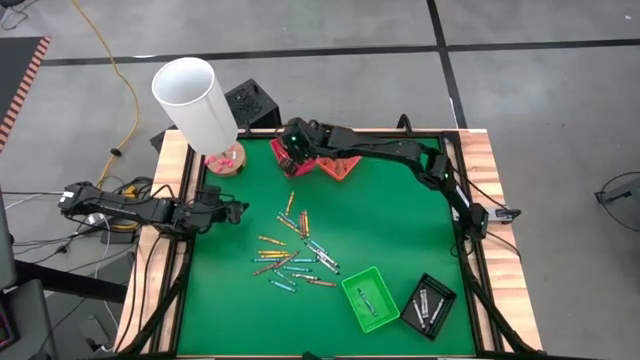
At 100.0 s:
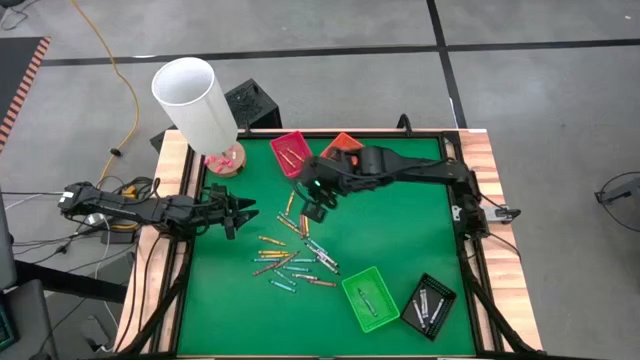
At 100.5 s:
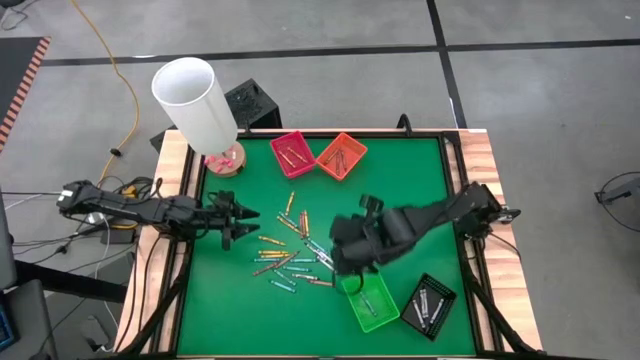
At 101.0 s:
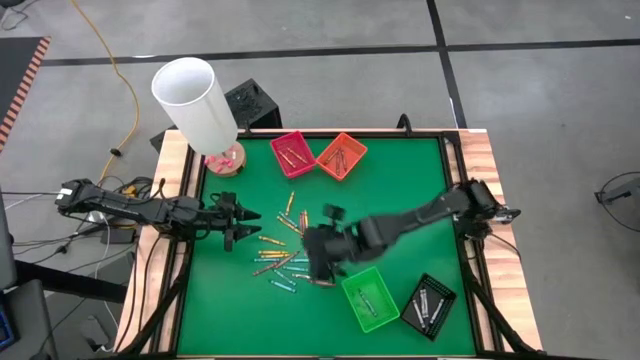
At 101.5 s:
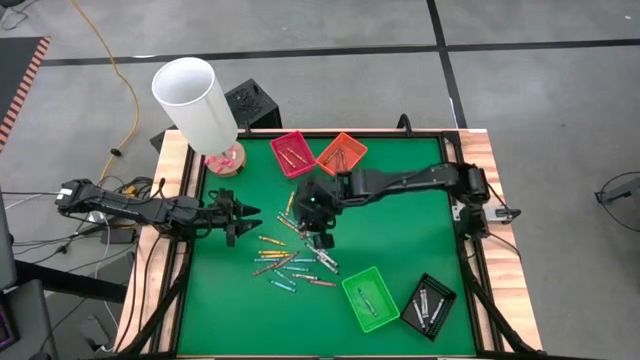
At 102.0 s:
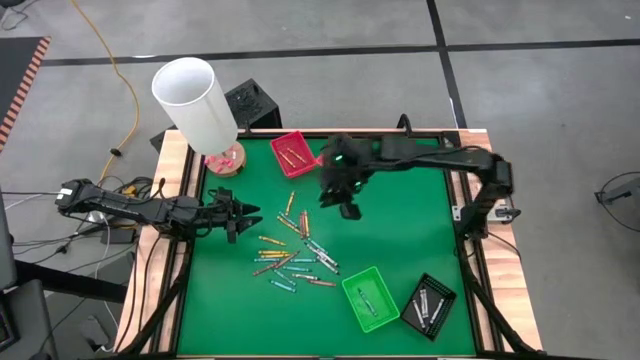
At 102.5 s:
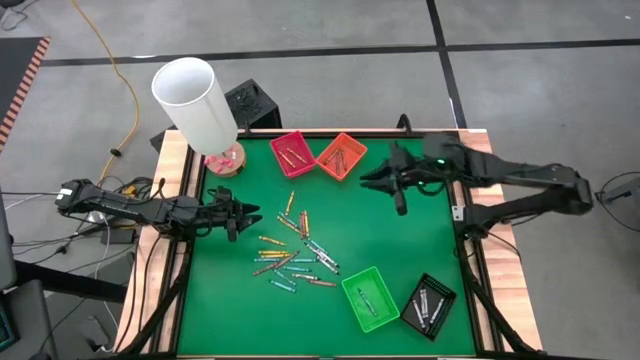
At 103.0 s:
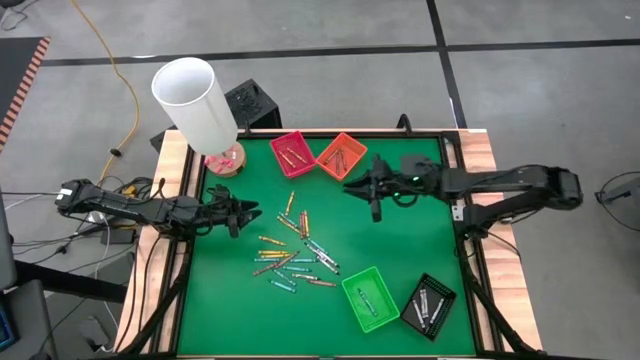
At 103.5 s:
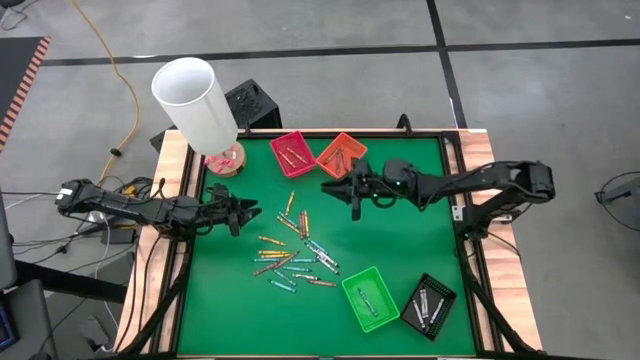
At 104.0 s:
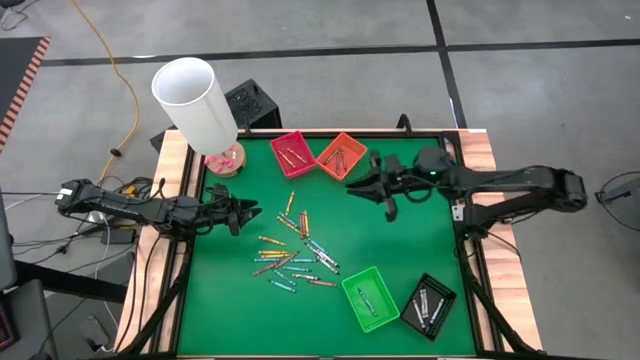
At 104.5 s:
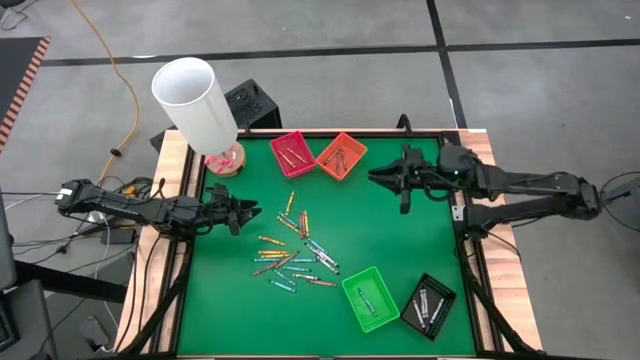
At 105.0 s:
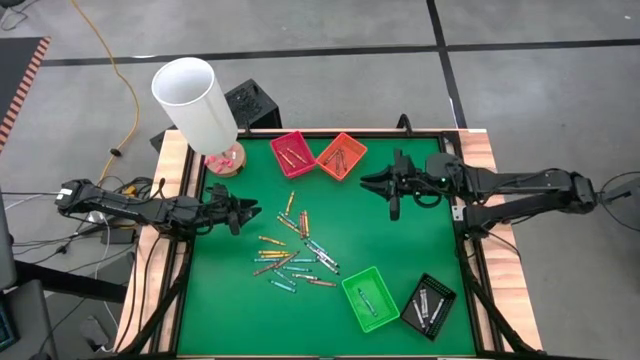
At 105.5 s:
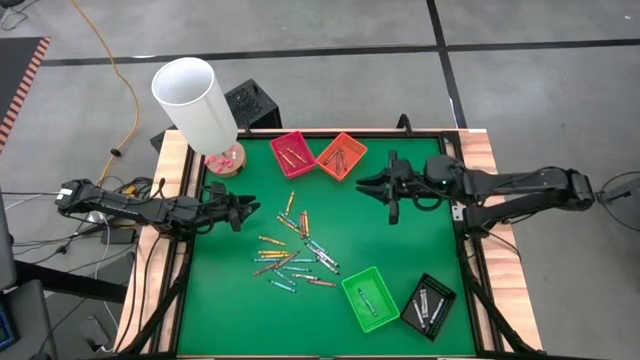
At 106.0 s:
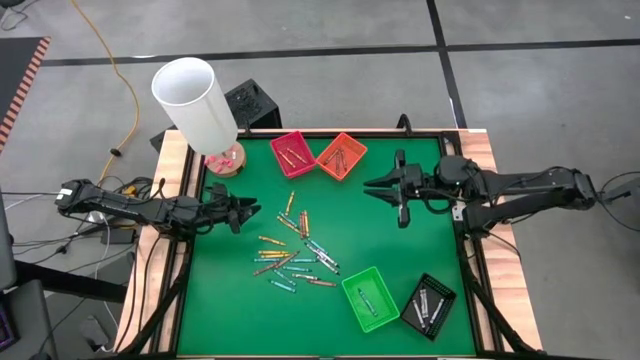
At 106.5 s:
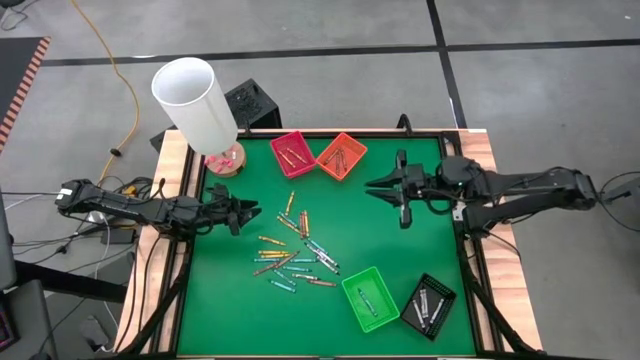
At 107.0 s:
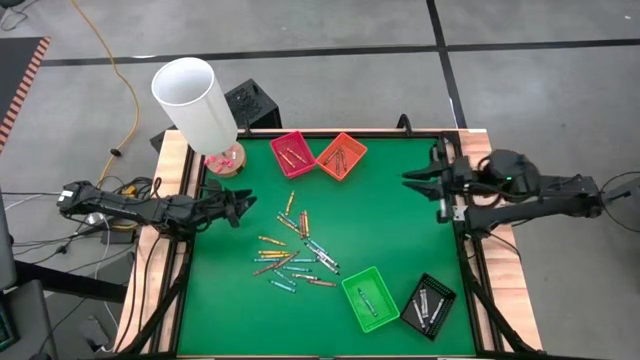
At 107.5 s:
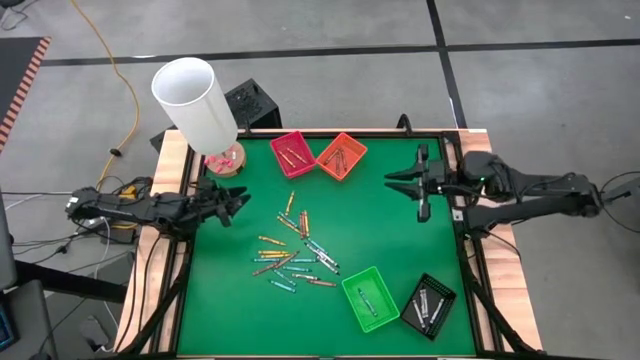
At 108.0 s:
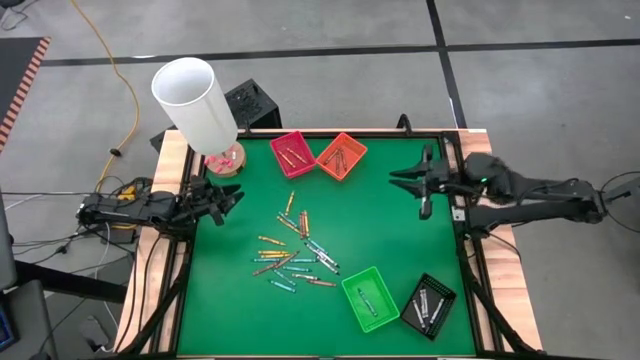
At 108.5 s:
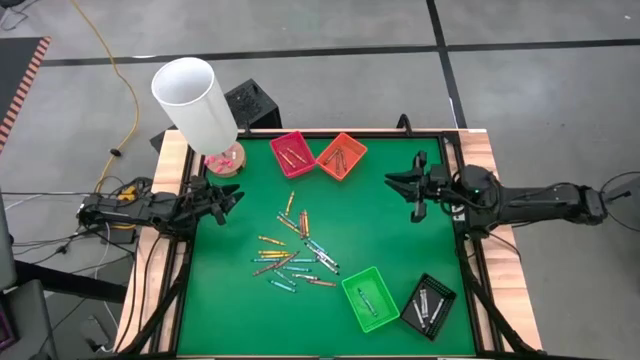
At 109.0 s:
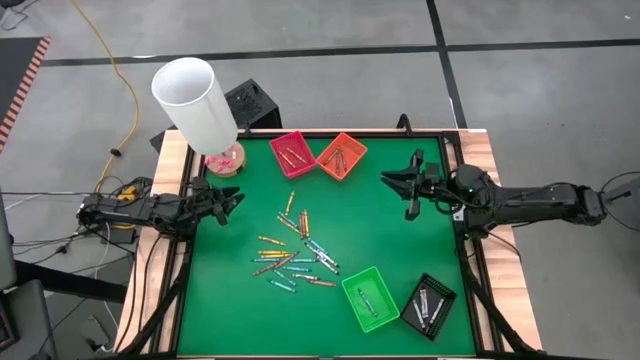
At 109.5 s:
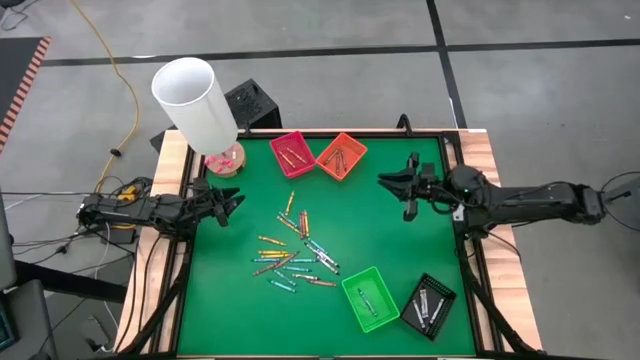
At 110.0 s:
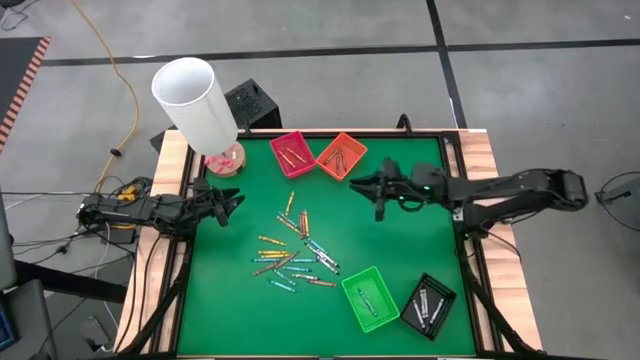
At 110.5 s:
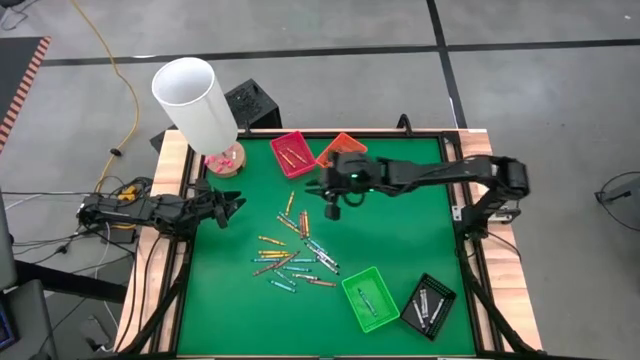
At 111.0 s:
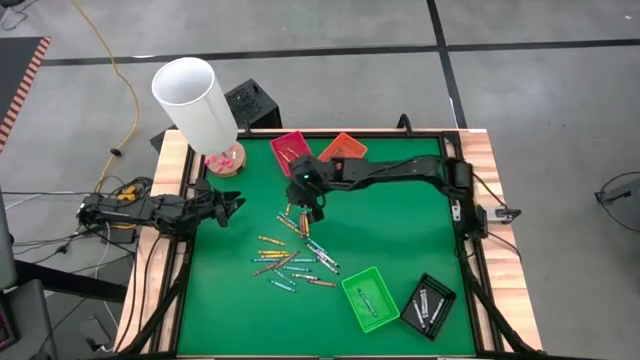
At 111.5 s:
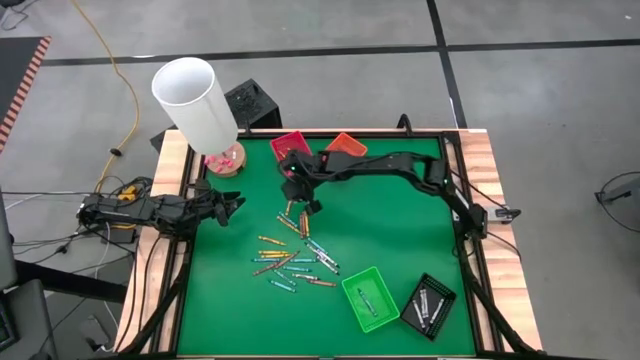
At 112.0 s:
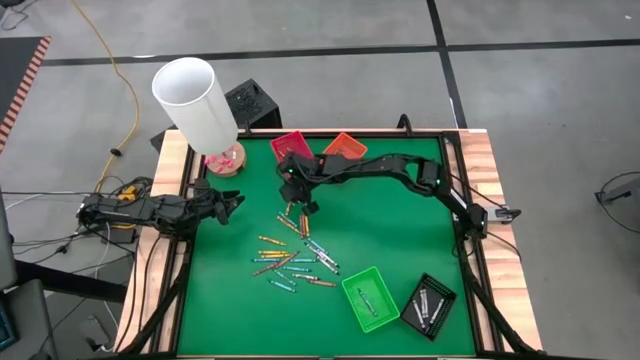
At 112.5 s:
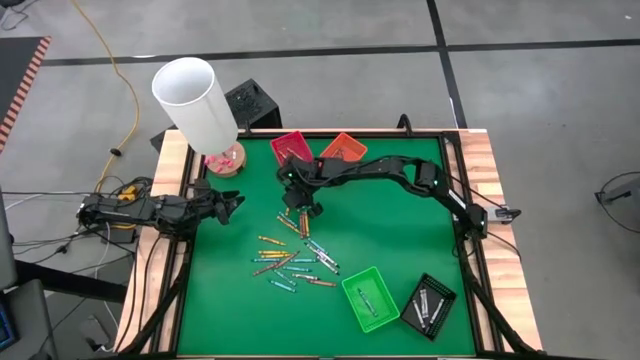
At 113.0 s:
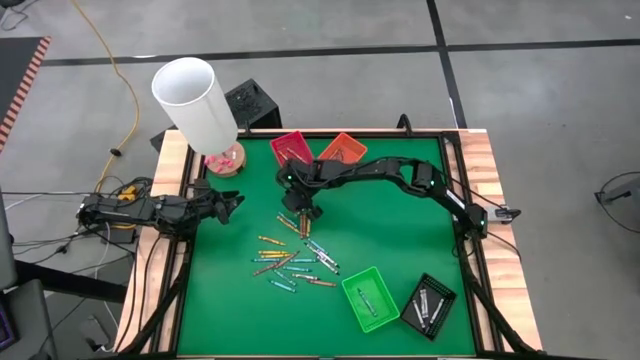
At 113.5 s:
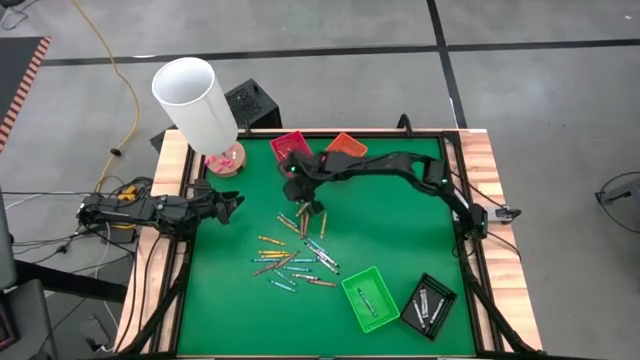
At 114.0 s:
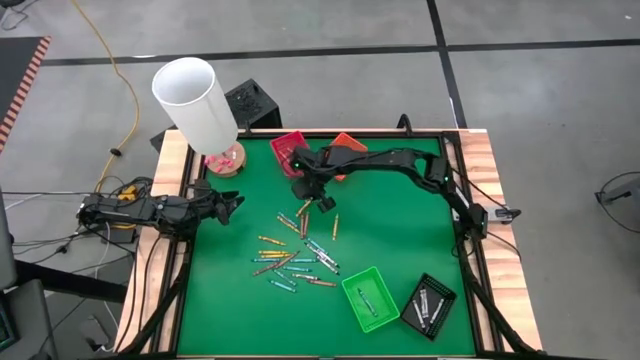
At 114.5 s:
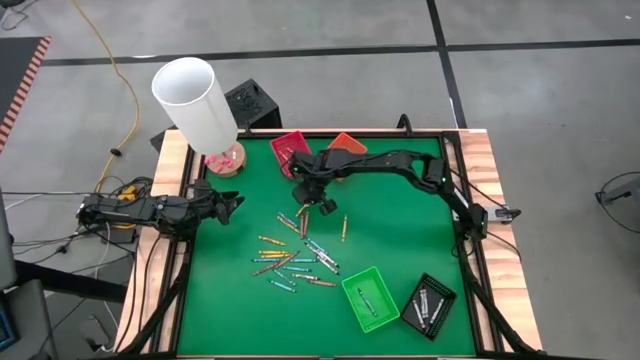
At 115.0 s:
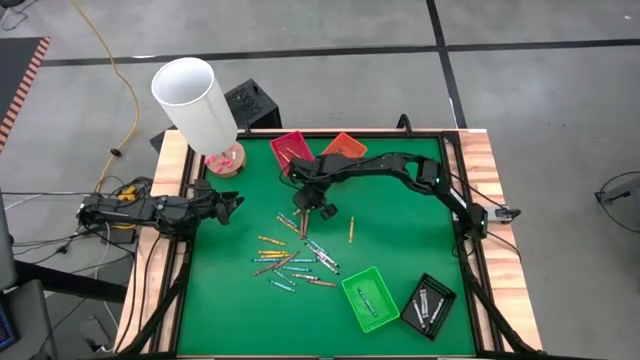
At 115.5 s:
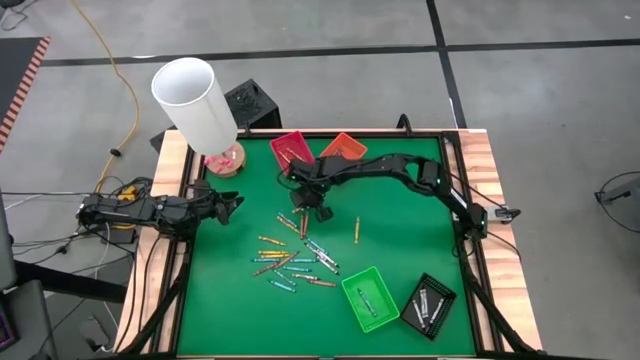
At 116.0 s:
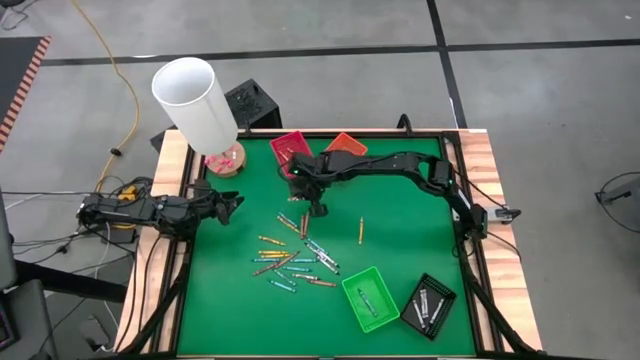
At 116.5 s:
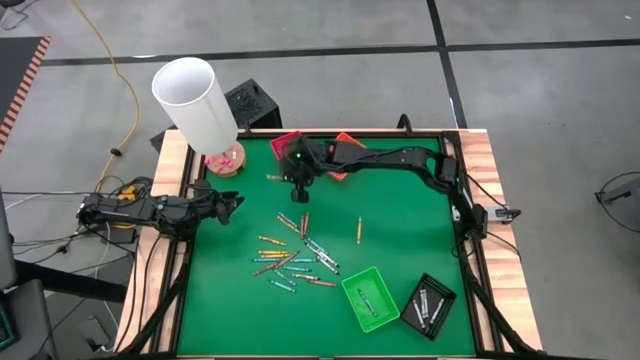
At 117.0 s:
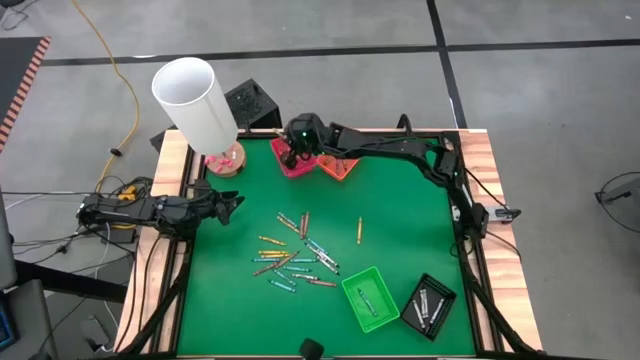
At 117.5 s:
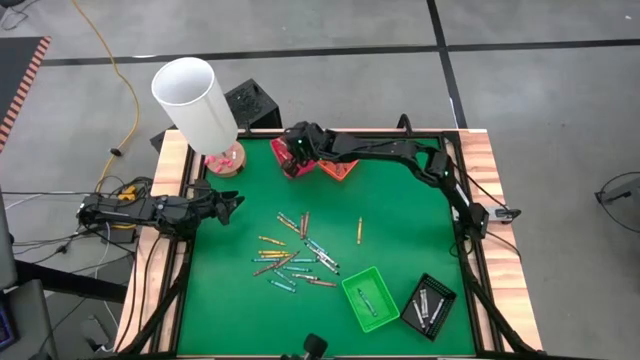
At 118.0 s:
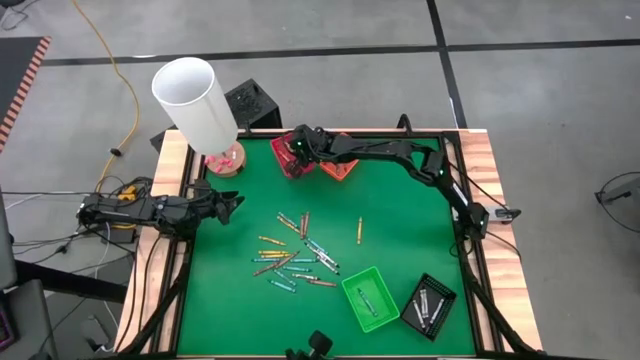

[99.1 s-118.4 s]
Task: Sort crayons
Put the light green crayon into the red bin

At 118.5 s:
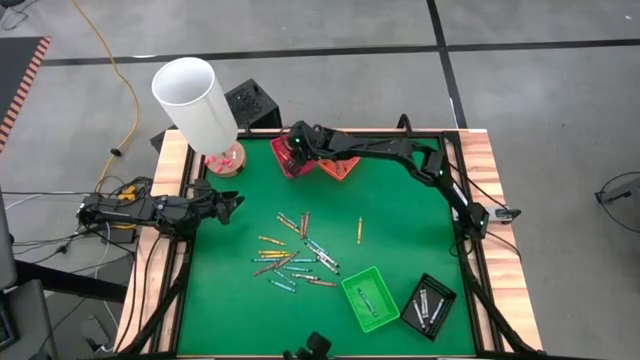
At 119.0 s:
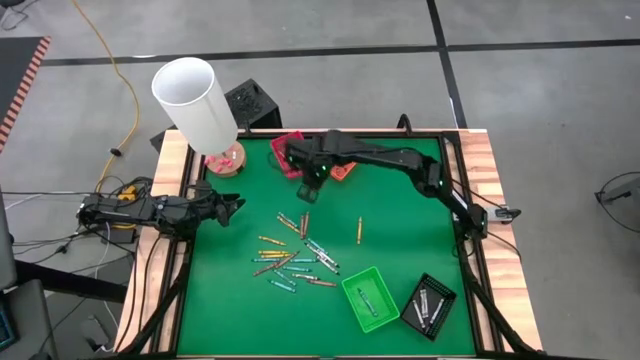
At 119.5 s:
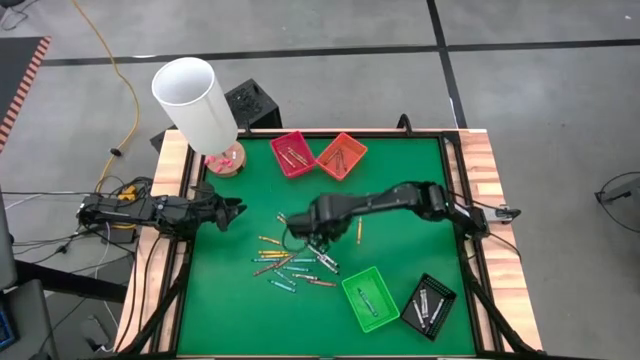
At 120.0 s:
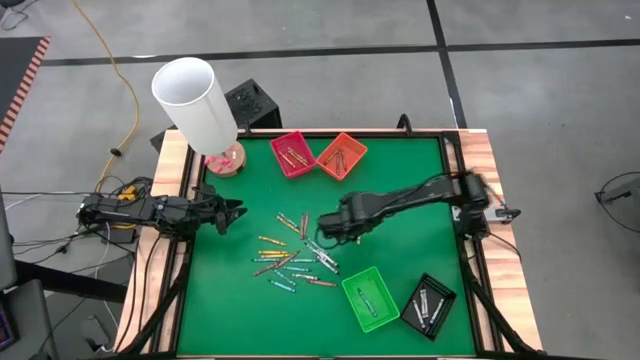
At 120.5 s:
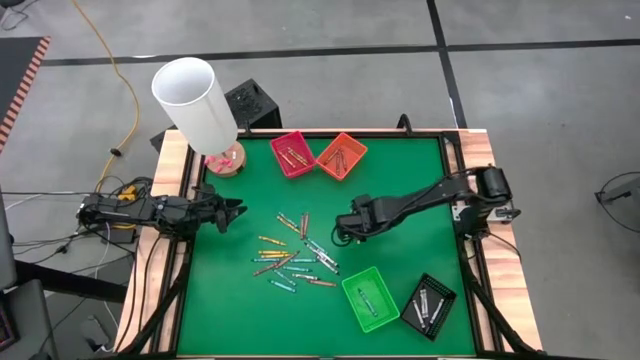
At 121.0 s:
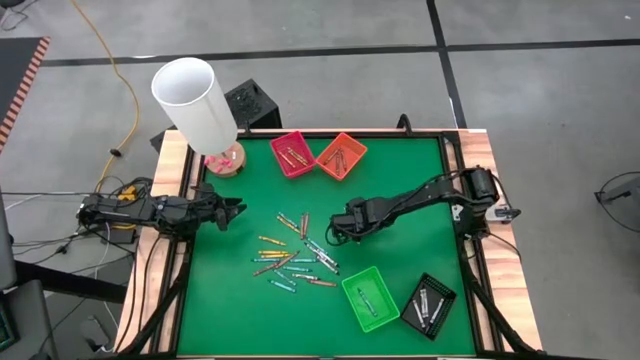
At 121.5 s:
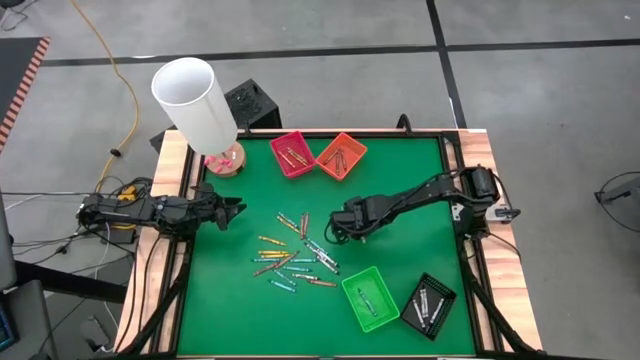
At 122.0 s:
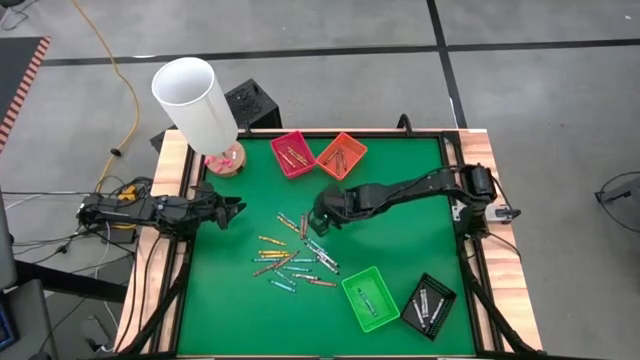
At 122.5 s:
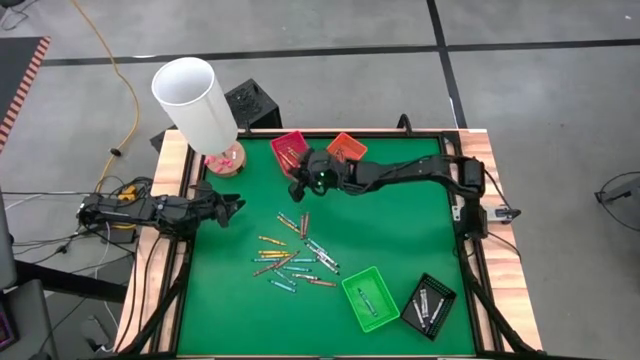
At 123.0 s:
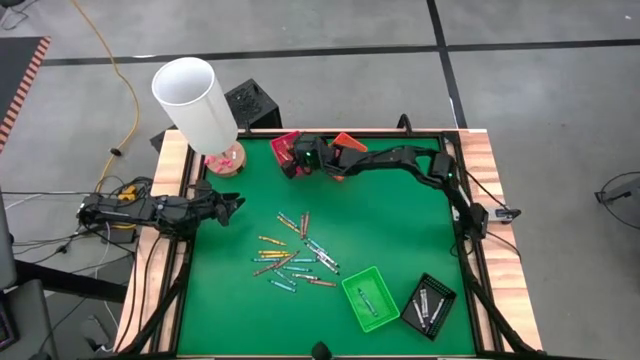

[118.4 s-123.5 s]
Put the light green crayon into the red bin
